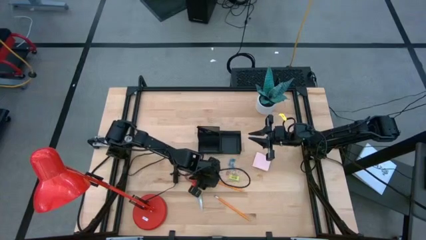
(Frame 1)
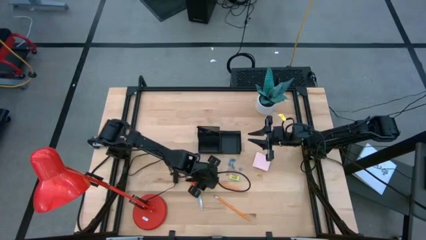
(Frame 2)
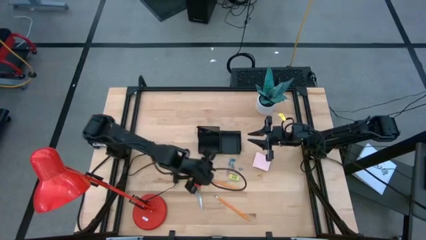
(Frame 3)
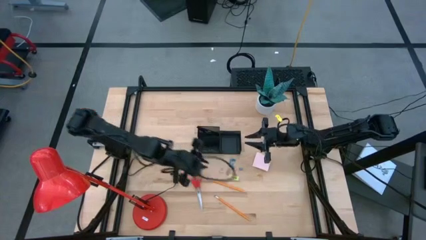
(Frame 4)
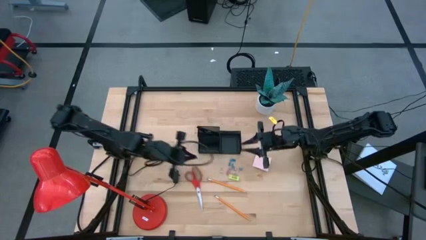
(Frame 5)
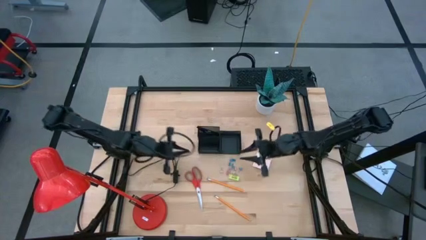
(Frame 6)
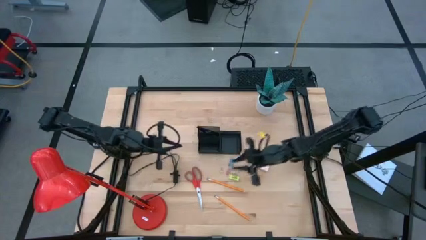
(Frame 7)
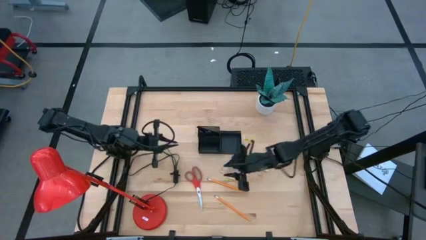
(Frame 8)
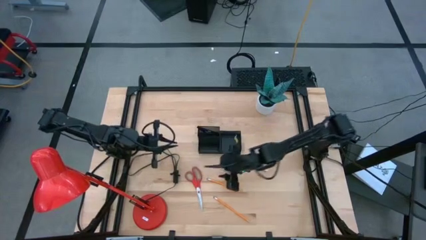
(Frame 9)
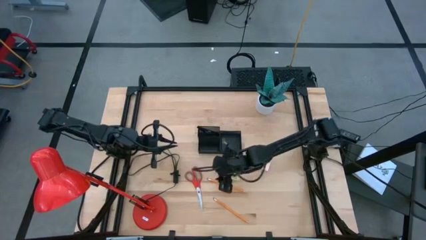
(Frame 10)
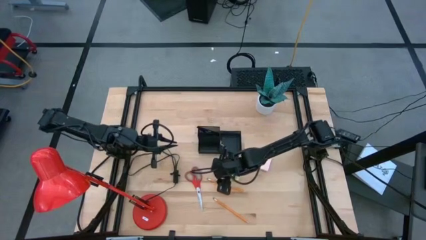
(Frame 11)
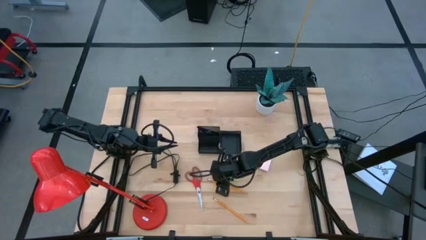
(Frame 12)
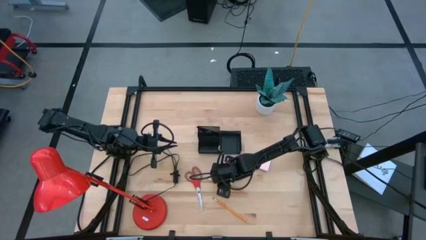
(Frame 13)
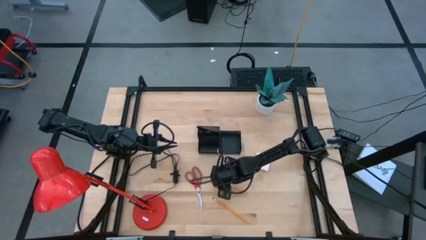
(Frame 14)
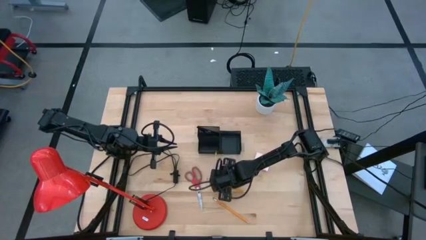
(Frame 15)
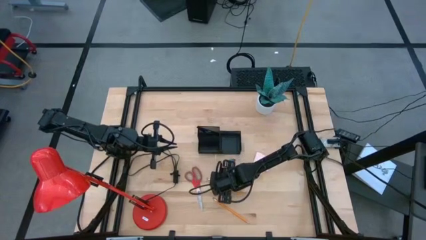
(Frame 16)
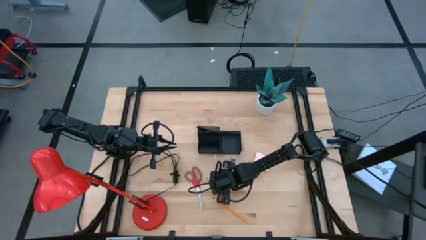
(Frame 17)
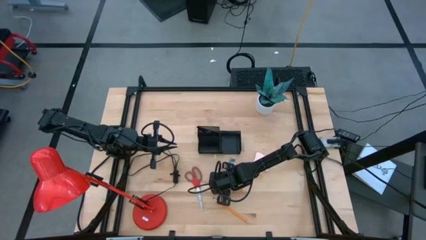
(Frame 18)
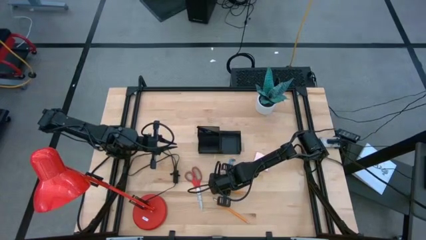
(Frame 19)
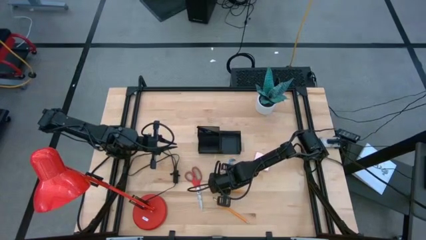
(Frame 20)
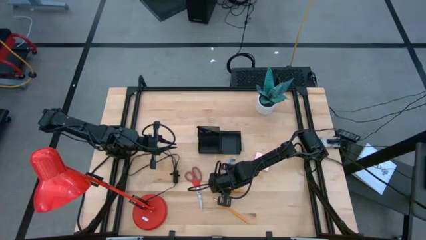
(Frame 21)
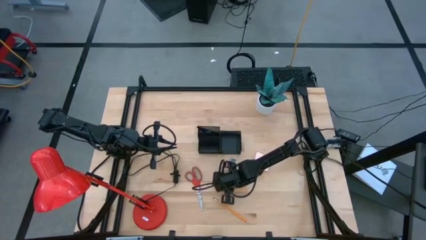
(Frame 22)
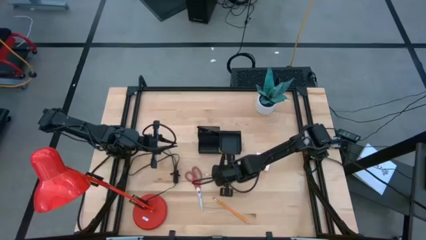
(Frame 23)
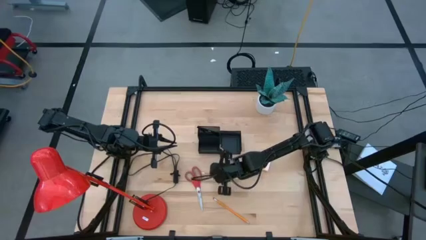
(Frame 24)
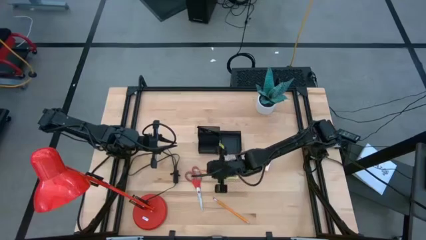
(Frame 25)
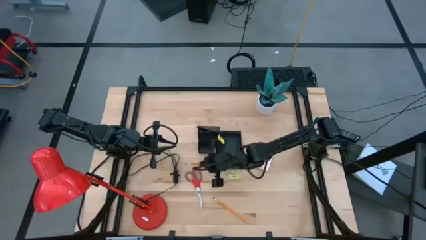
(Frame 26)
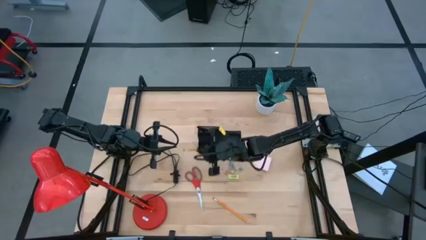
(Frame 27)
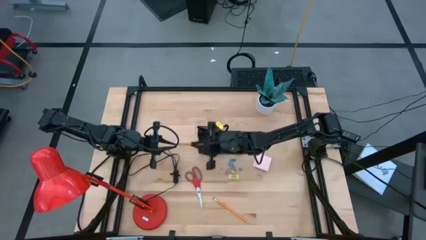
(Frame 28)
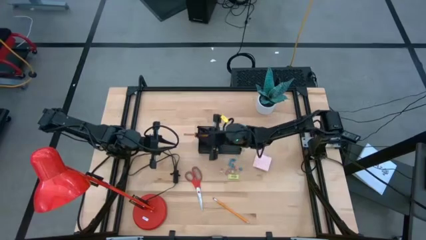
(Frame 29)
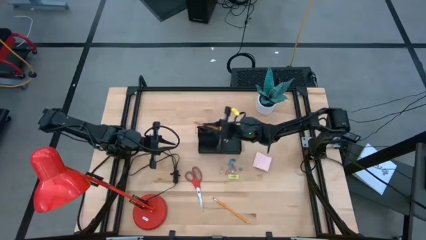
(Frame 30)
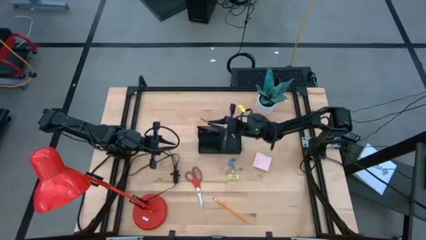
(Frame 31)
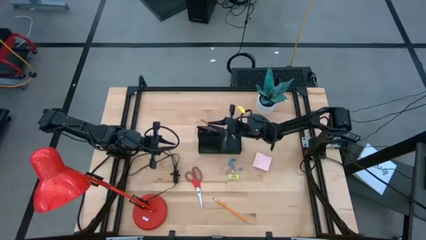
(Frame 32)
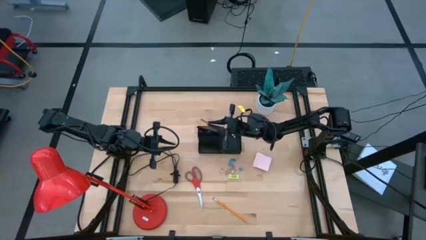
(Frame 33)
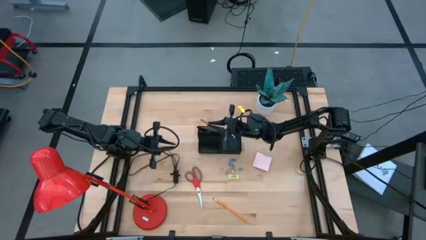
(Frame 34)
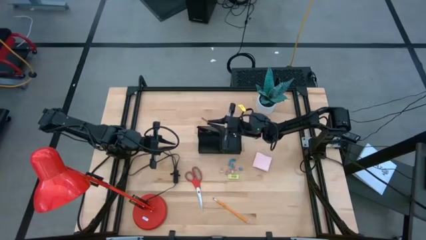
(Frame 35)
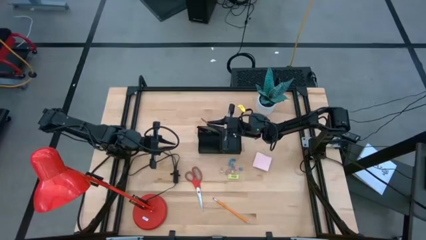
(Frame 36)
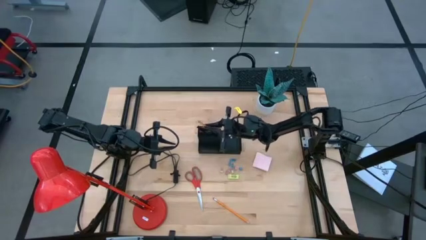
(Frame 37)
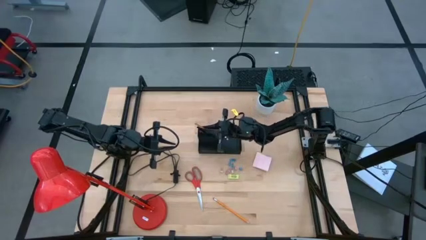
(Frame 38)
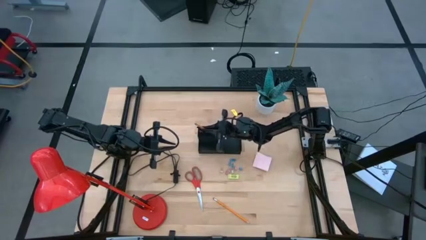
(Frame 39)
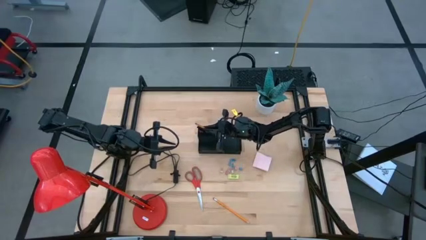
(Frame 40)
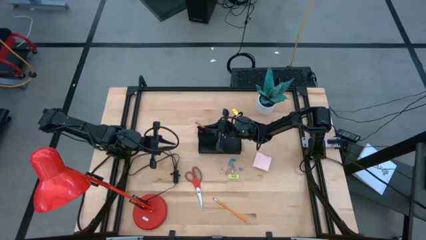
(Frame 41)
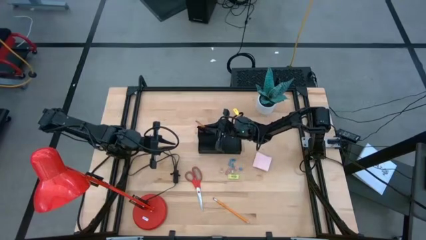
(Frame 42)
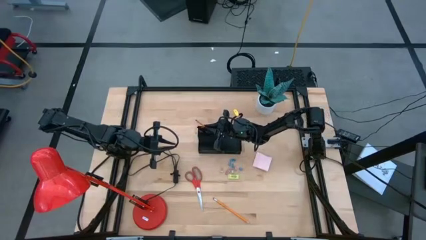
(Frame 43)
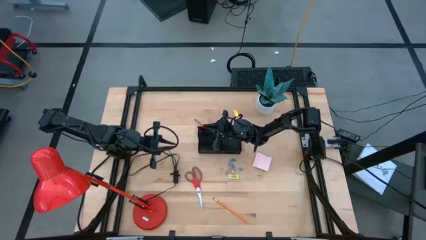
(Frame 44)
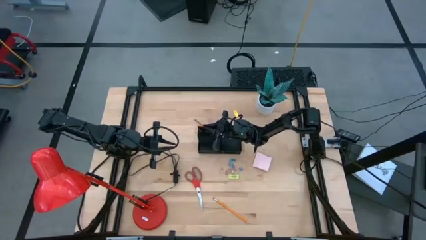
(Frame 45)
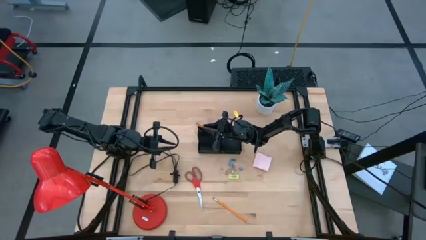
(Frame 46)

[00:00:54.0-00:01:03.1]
Task: Pick and place office supplies into organizer
Put the orange pencil into the black desk organizer

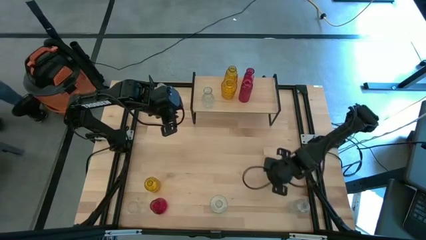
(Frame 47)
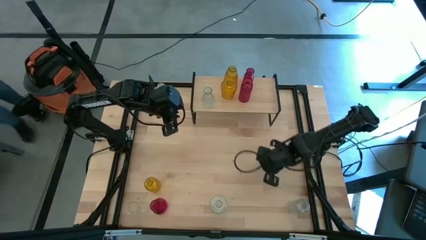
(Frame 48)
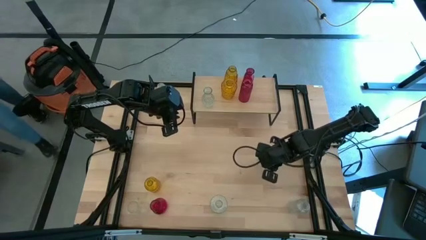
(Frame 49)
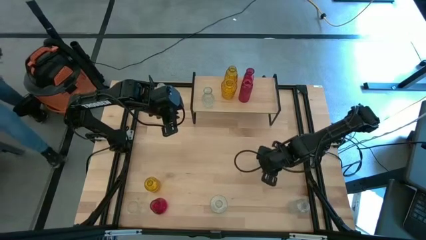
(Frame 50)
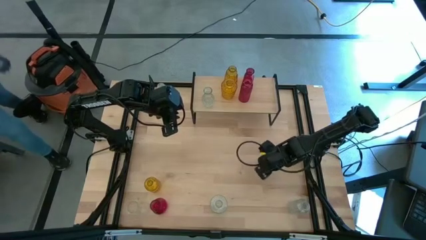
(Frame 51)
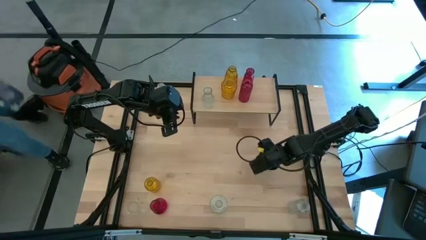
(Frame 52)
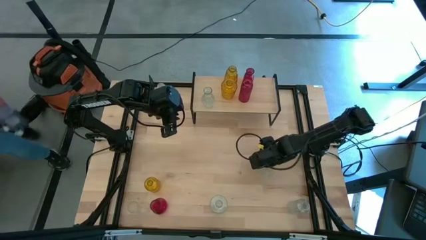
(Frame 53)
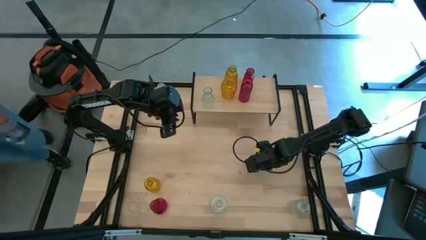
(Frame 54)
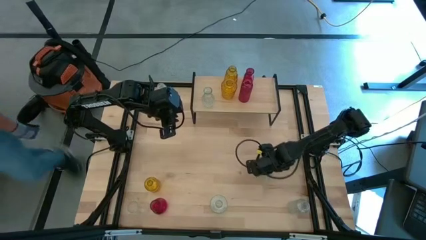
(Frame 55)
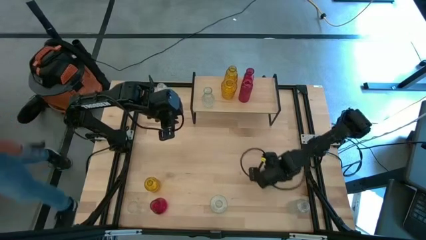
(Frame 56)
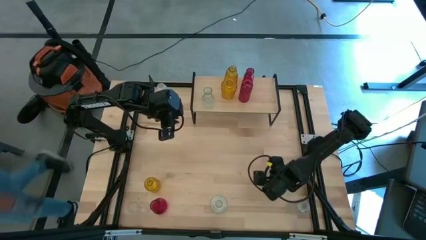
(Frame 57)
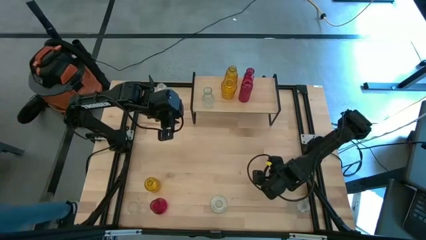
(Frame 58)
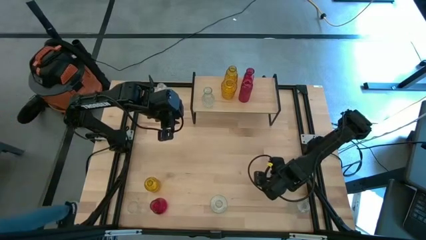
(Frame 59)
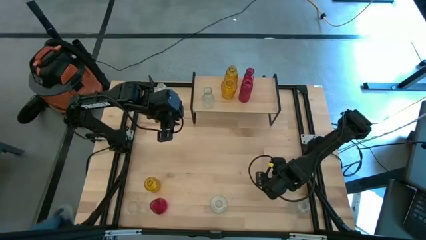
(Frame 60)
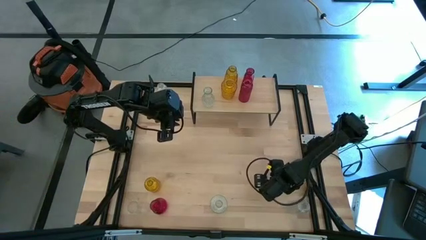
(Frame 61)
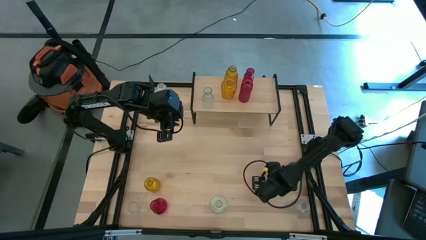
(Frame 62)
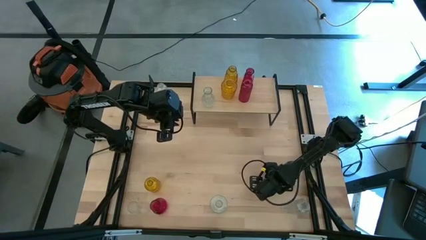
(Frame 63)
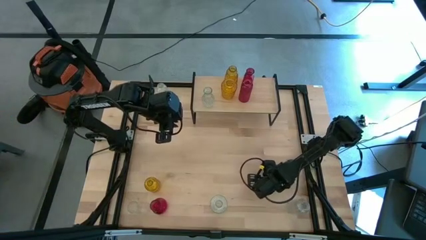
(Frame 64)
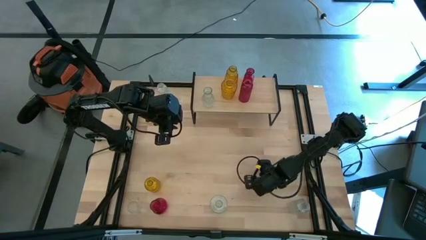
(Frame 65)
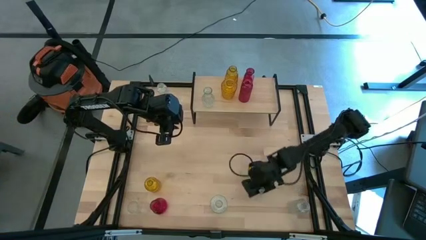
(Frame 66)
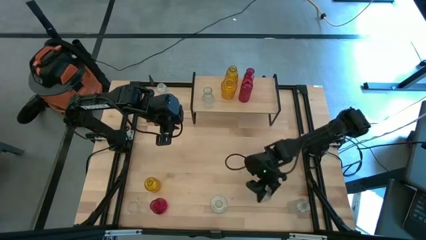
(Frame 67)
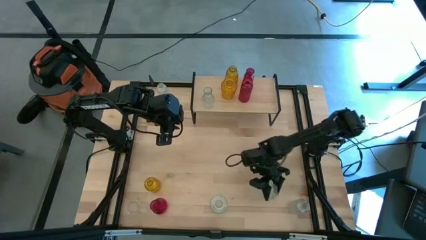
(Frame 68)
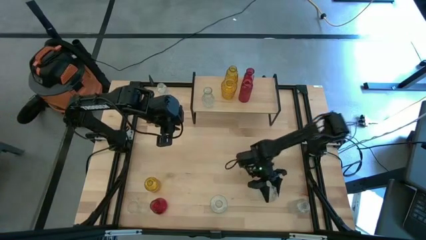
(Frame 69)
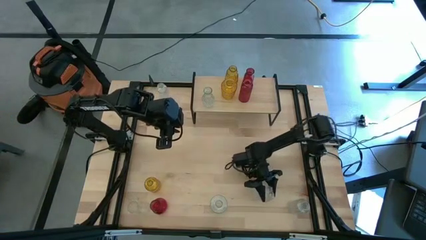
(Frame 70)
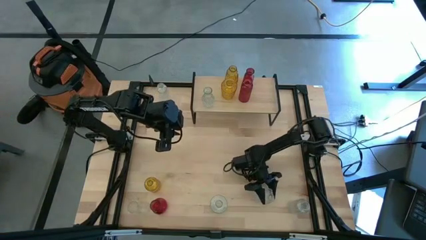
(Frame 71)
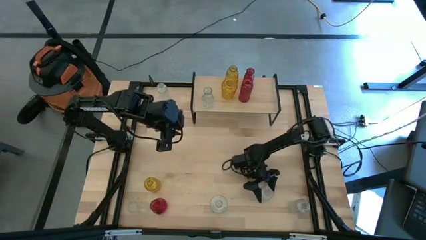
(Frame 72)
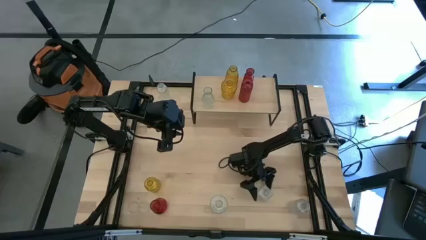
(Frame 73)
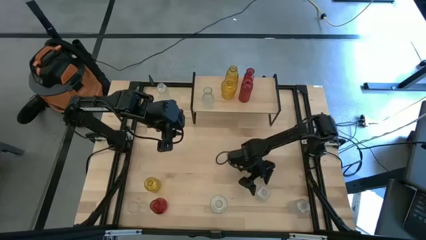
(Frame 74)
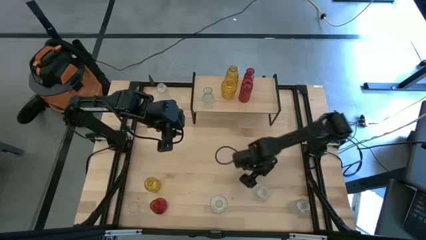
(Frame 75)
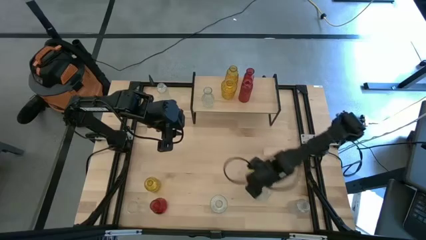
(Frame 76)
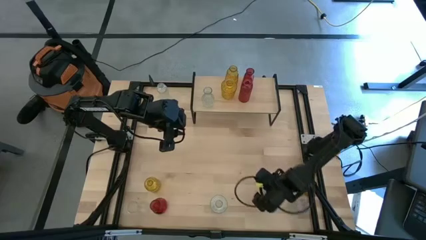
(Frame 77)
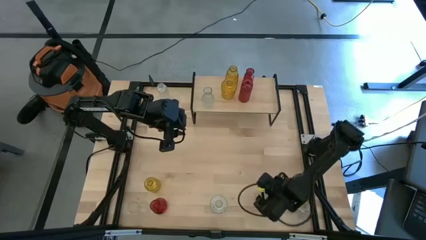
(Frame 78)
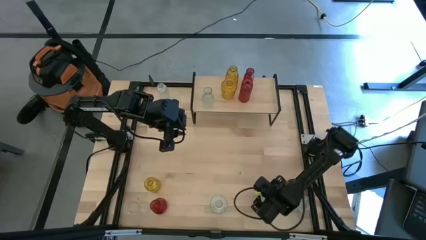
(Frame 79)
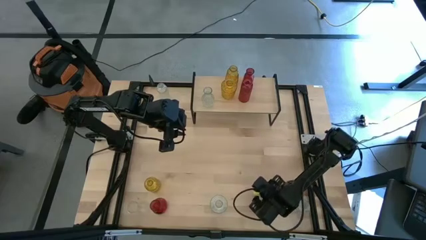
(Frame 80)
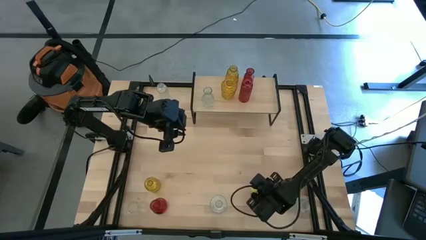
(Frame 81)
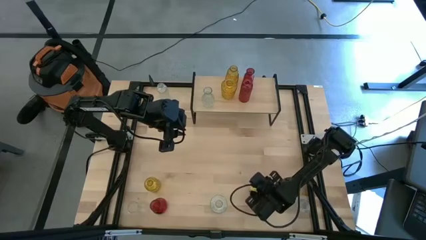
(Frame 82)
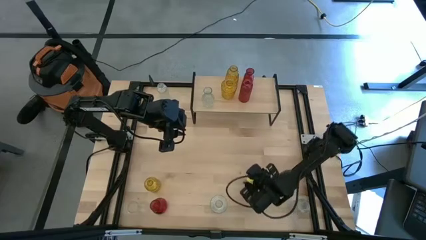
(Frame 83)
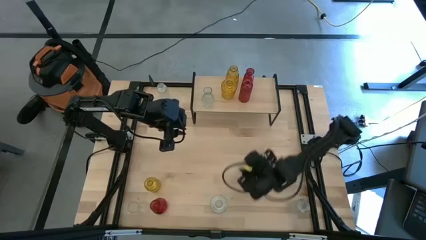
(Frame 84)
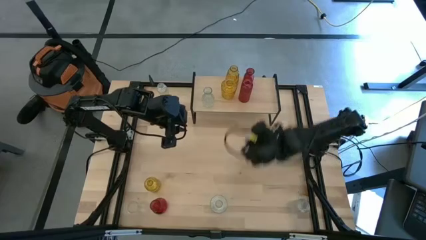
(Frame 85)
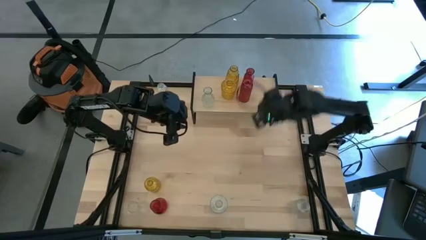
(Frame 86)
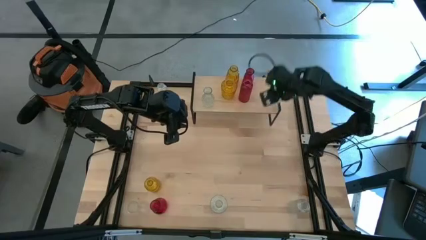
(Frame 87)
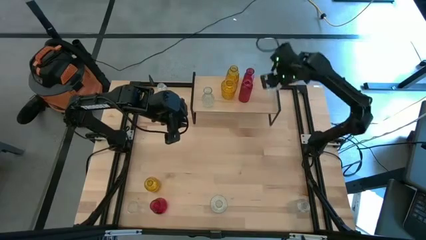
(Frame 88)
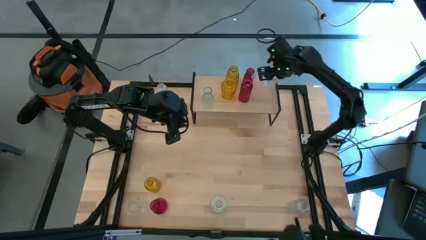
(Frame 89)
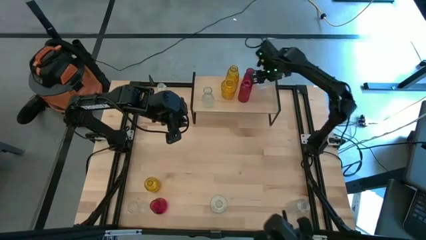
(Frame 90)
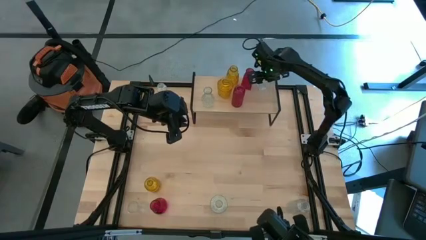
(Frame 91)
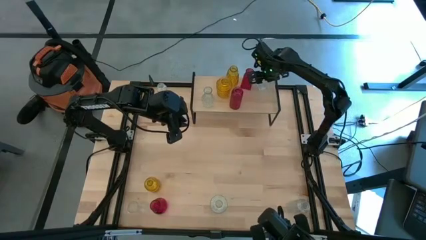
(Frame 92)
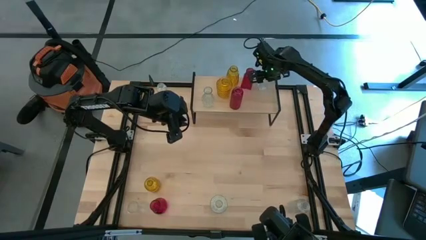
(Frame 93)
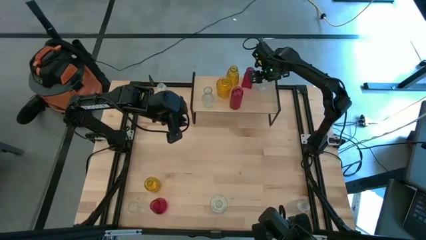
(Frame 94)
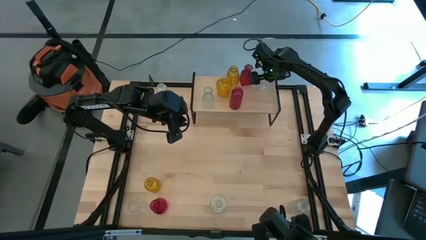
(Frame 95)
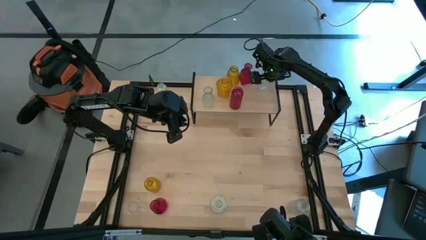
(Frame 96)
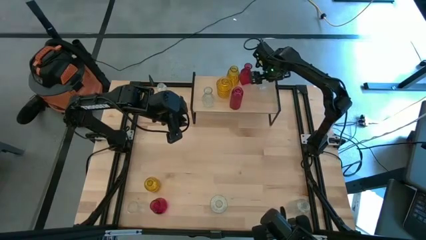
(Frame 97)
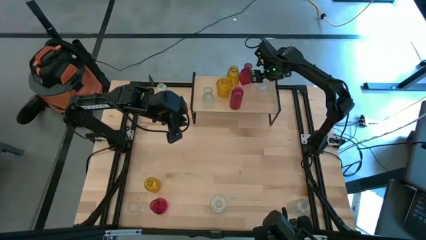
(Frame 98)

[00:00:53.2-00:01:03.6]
Task: sort vases onto shelf
Put the transparent vase on the shelf aligned with the other transparent vase
